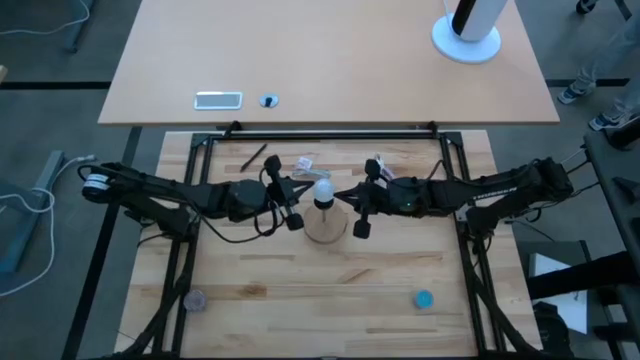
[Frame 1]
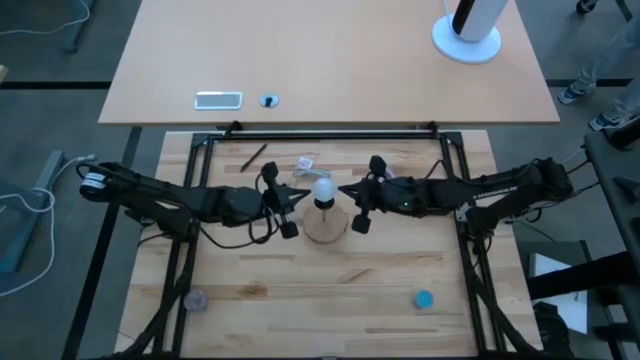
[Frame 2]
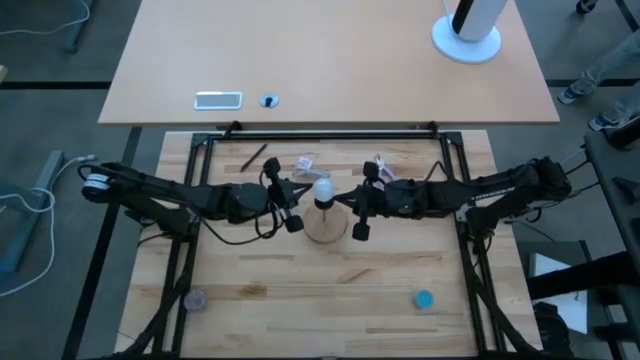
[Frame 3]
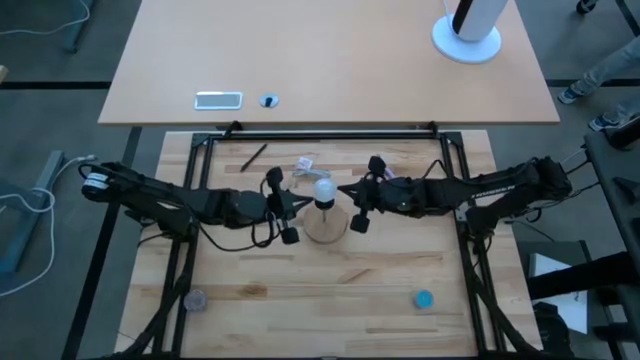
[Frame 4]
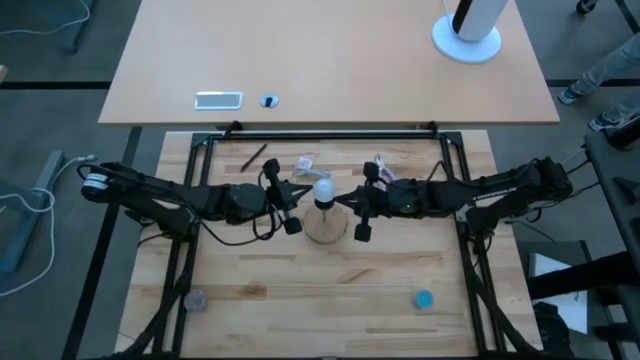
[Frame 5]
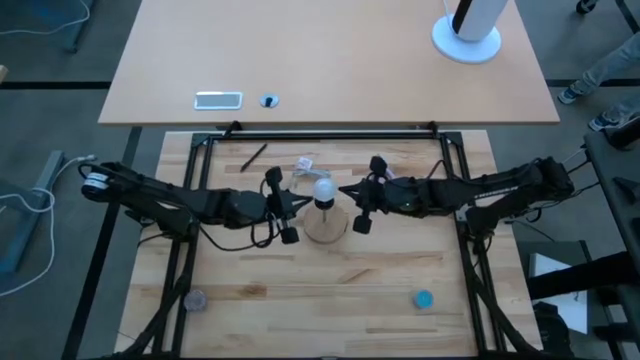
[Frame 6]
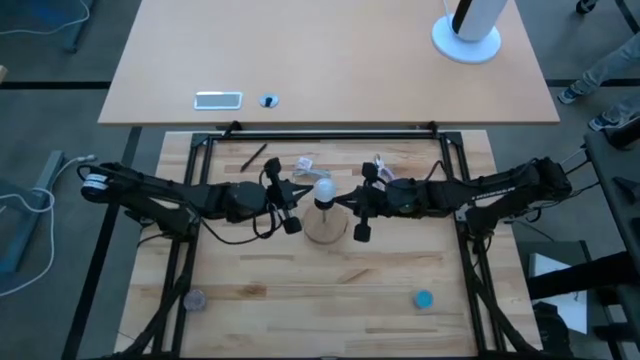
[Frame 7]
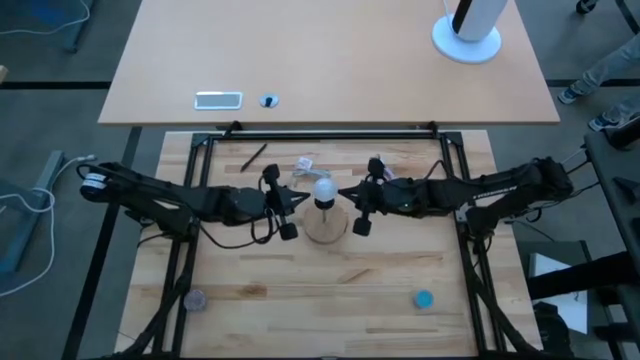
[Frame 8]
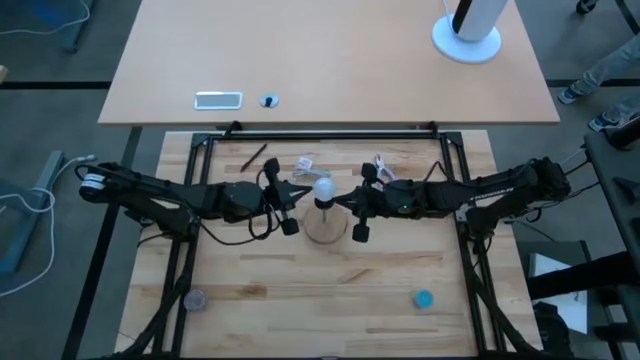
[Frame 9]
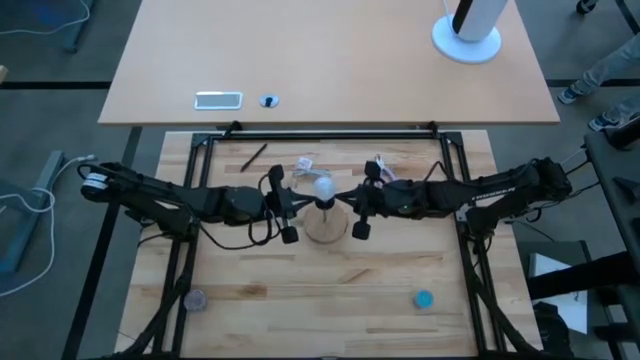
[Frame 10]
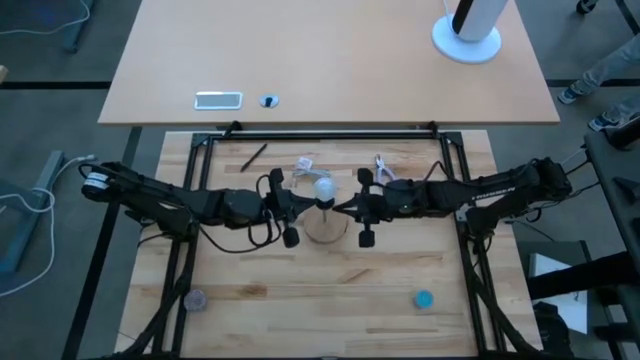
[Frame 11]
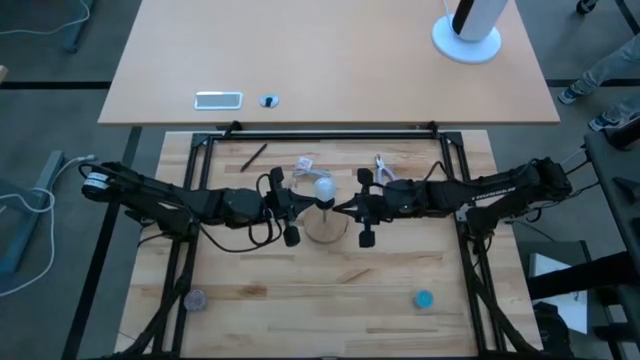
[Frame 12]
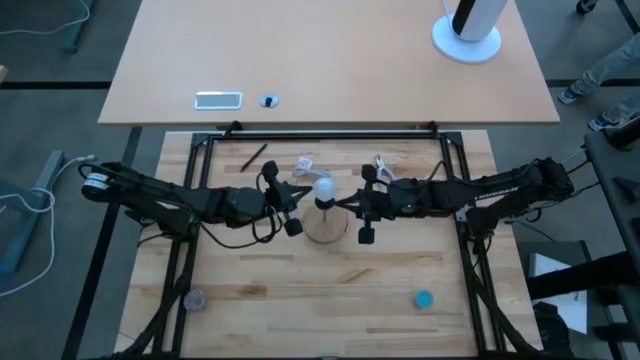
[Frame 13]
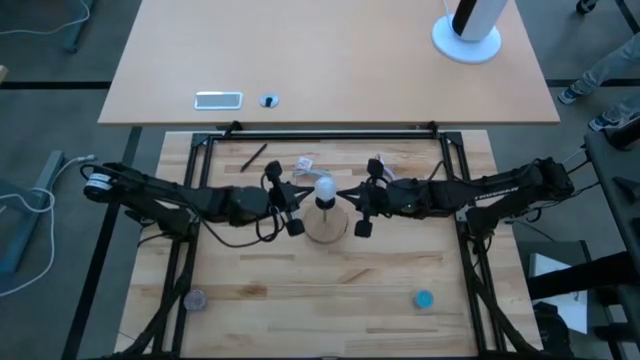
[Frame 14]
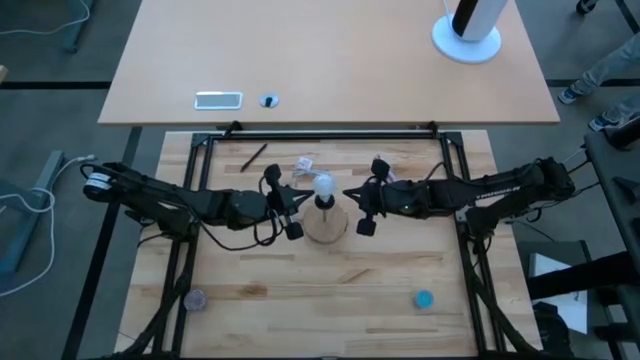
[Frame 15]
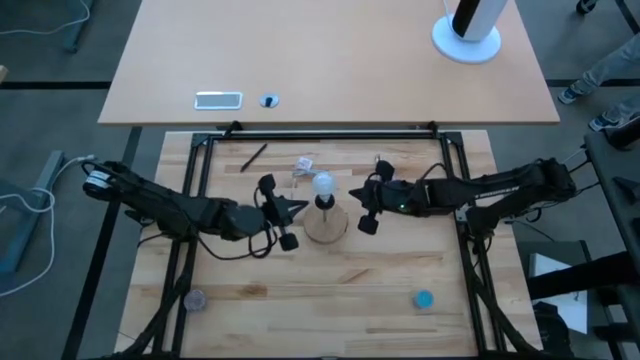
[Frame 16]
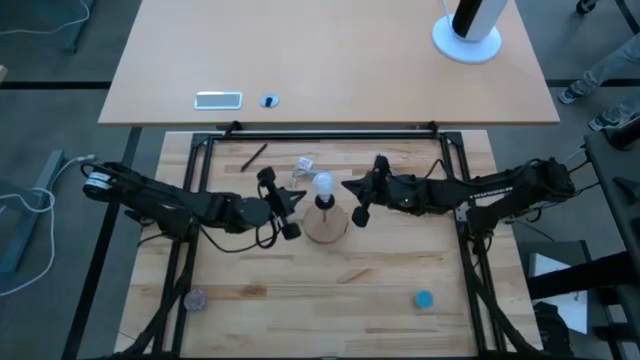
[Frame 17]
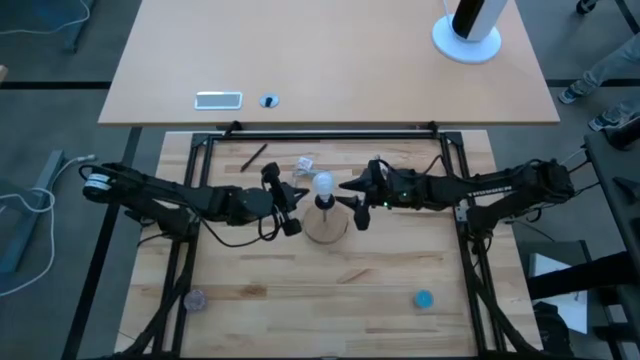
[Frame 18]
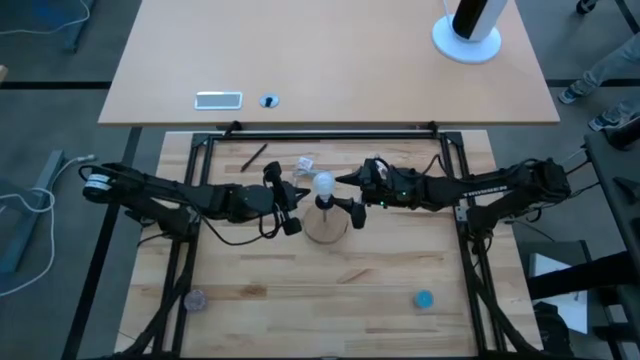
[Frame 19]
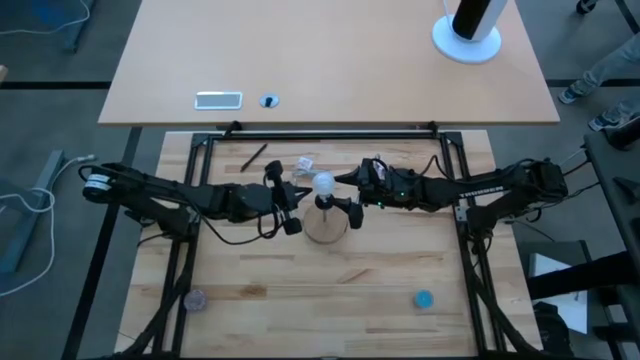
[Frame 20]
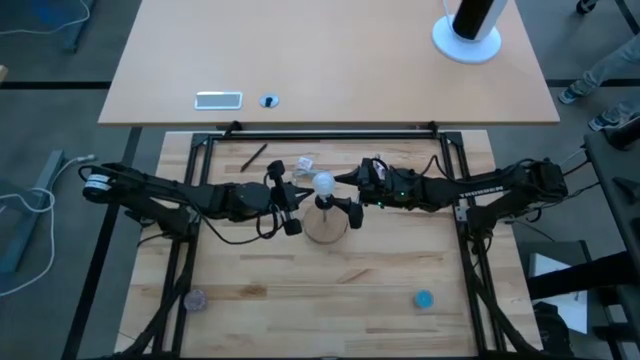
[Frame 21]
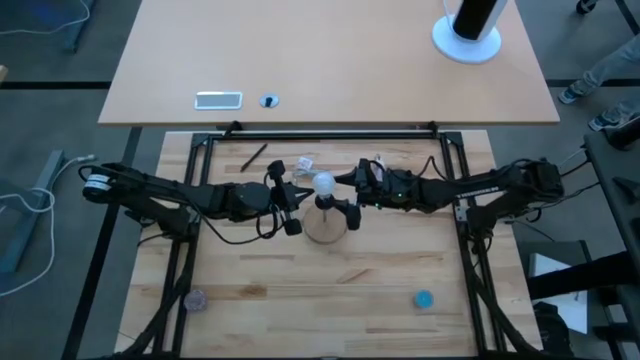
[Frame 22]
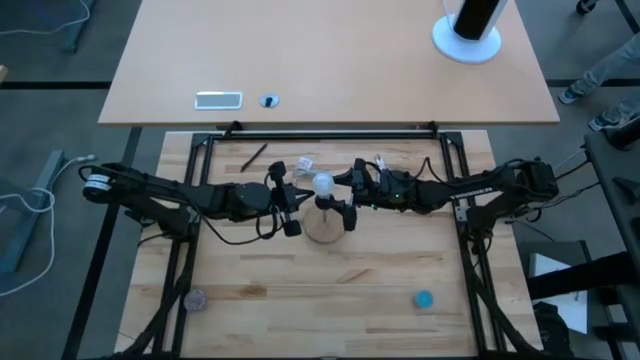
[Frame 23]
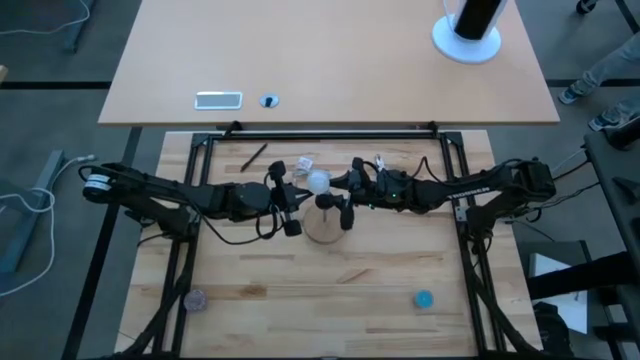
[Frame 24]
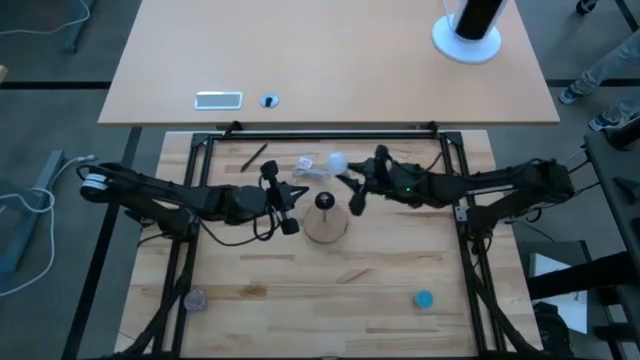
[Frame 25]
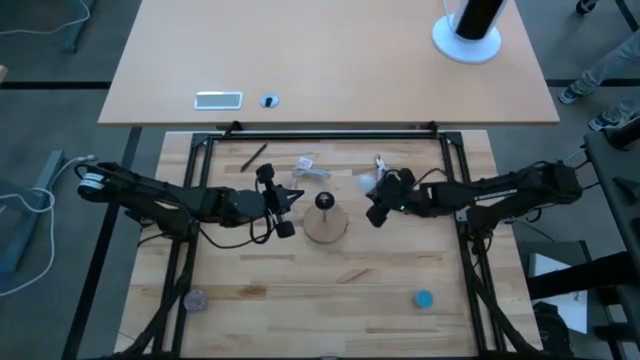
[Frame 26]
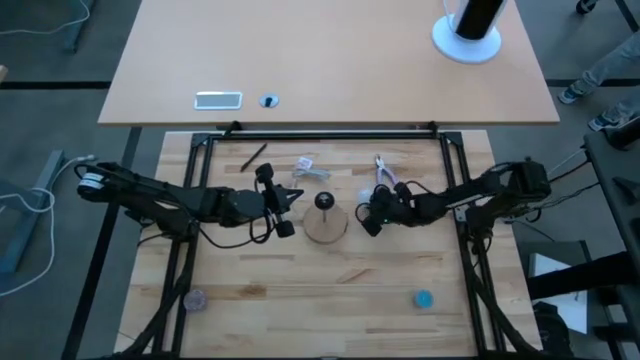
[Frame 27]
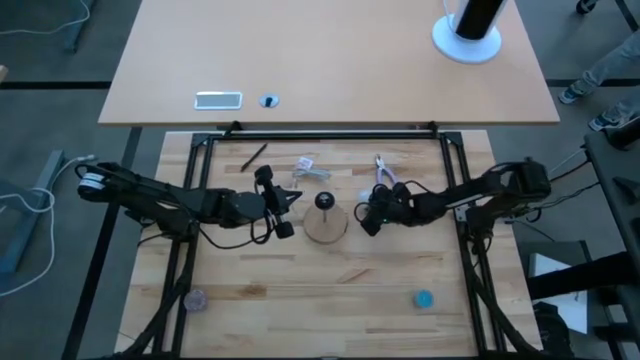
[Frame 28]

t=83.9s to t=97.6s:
Task: Screw lightbulb
Remove the lightbulb from the brown lamp

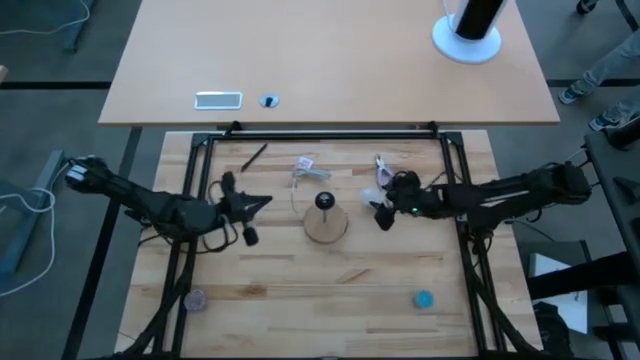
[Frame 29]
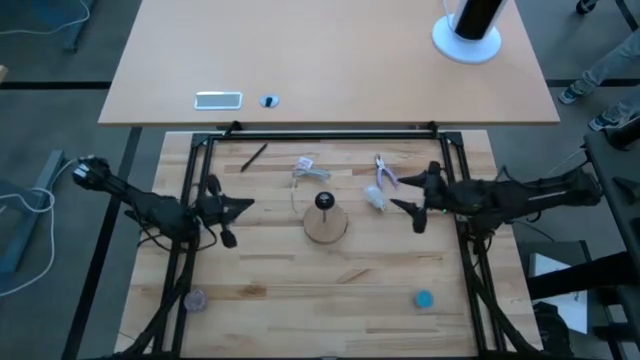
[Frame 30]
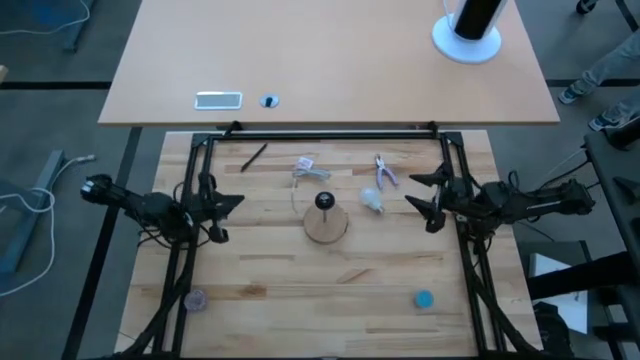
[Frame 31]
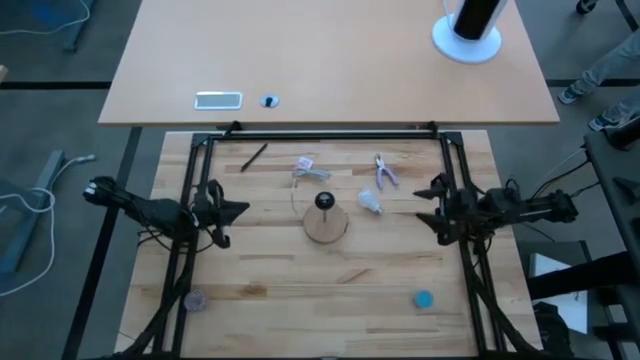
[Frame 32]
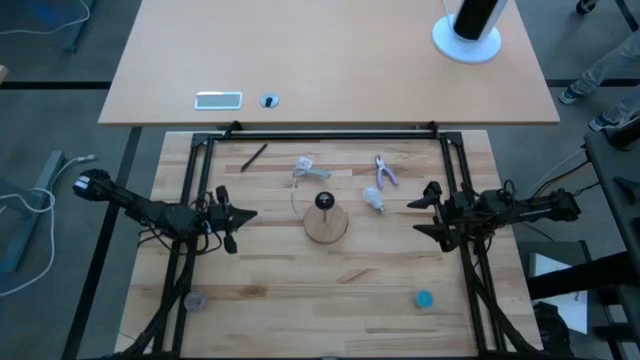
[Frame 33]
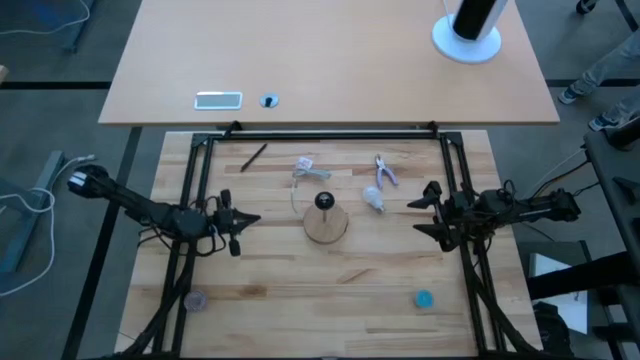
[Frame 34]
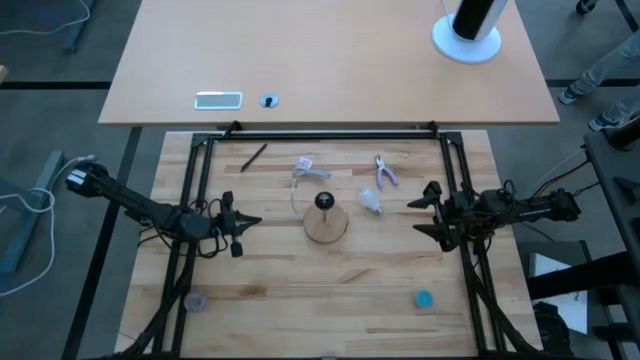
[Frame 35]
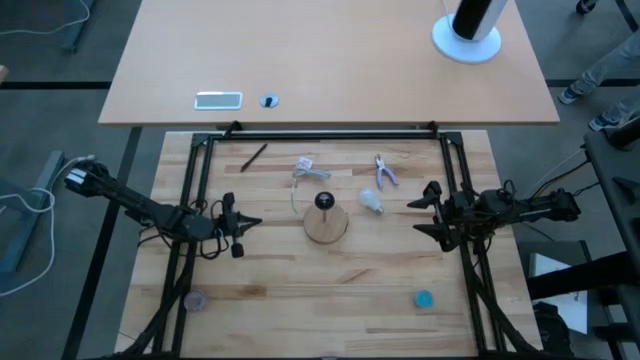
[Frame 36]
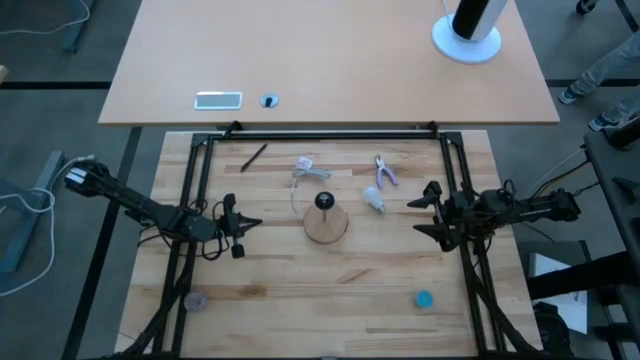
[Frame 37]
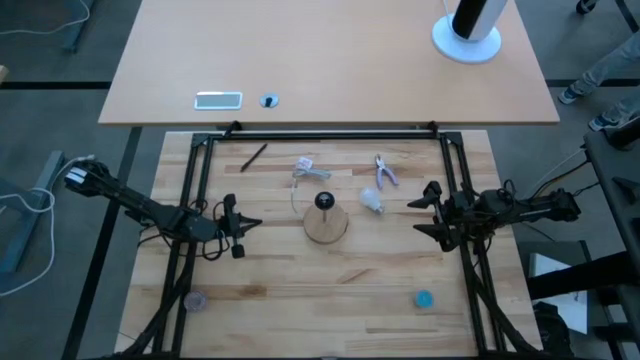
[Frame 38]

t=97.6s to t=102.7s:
Return to Home Position

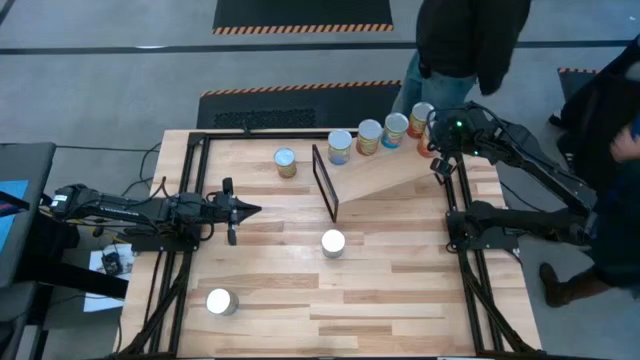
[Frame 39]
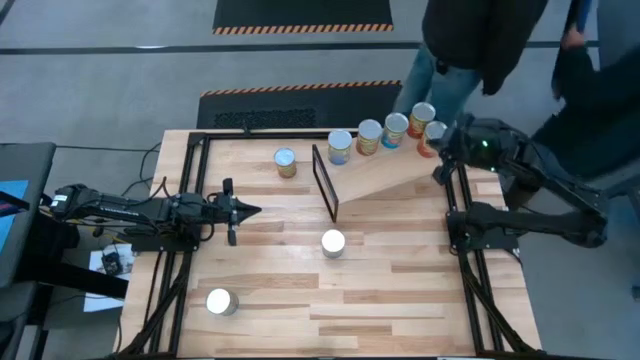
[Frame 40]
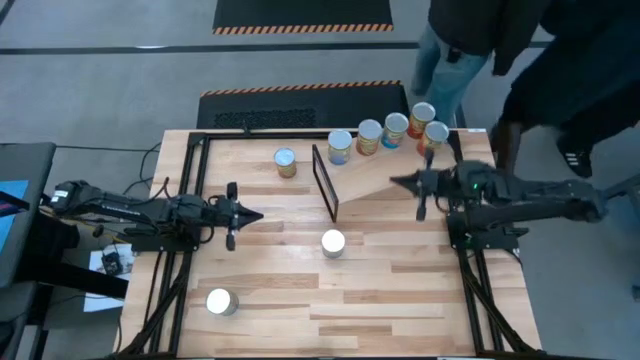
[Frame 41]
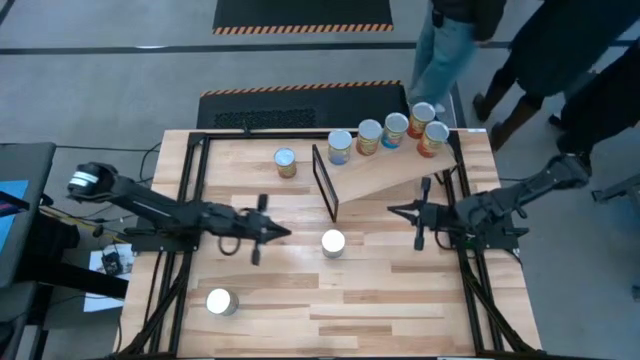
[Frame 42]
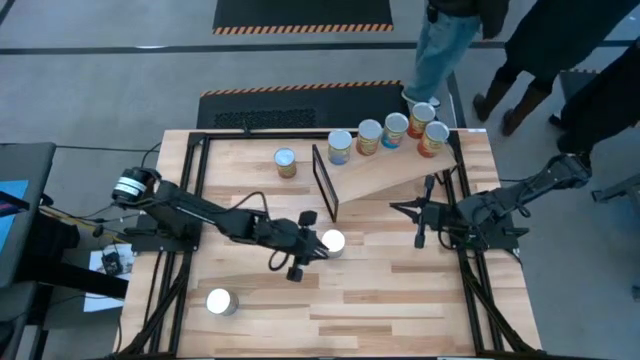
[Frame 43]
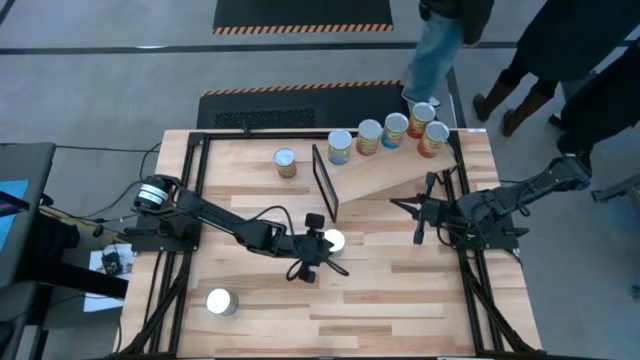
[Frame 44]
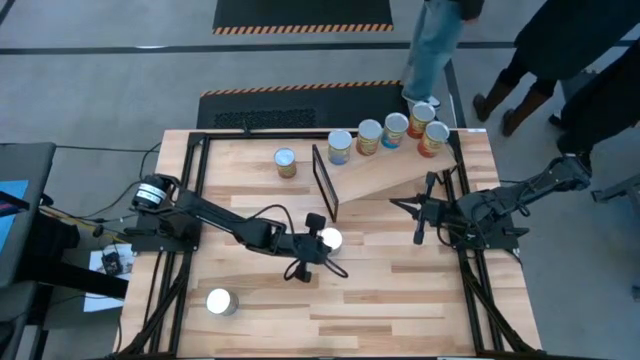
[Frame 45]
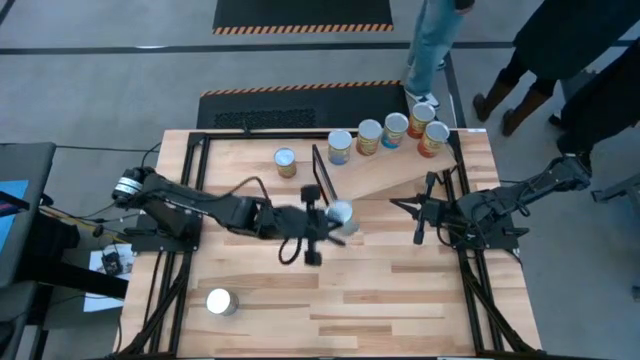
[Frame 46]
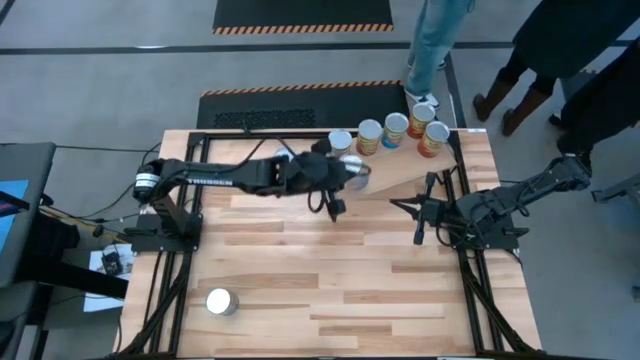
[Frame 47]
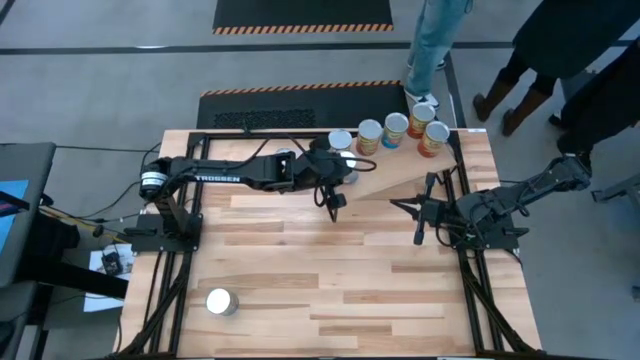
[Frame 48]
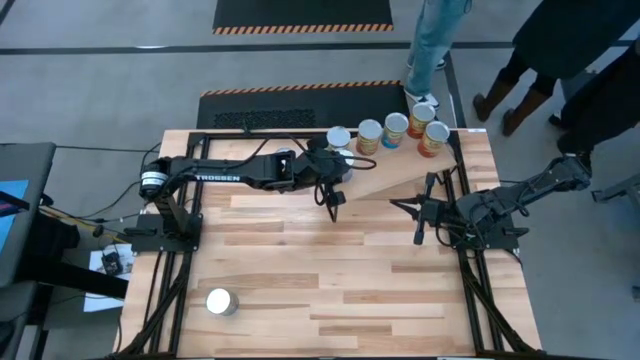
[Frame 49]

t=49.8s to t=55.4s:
Task: Pick and place cans onto a shelf
Put the canned peaches aligned with the other canned peaches on the shelf
